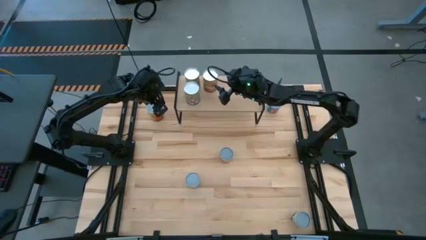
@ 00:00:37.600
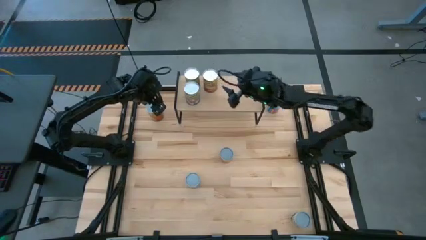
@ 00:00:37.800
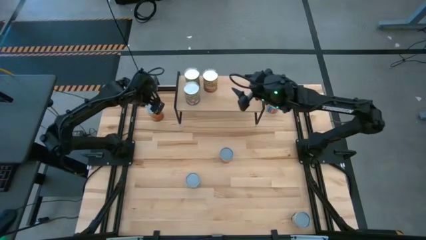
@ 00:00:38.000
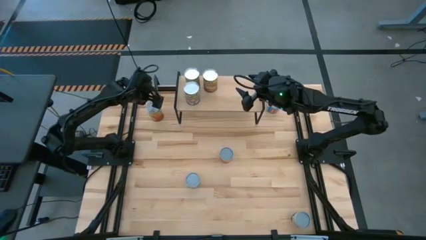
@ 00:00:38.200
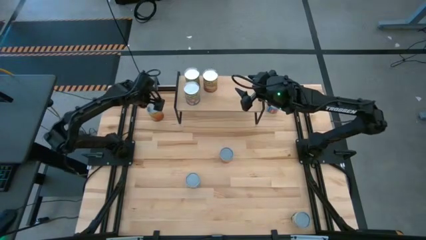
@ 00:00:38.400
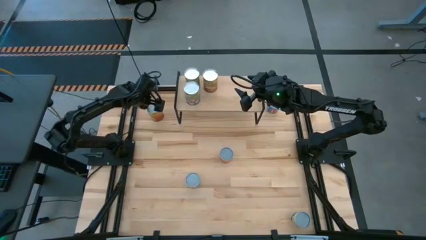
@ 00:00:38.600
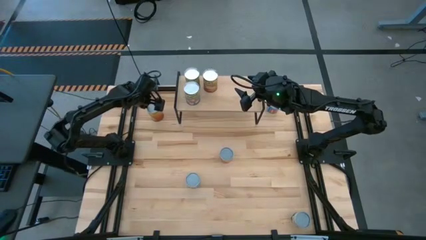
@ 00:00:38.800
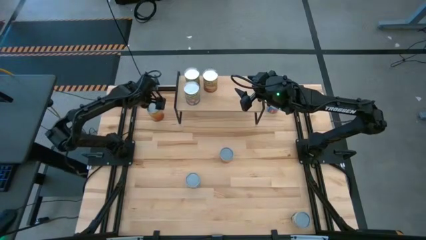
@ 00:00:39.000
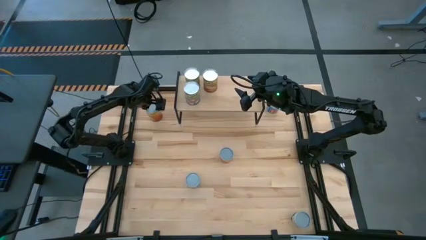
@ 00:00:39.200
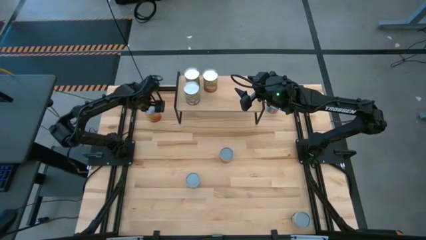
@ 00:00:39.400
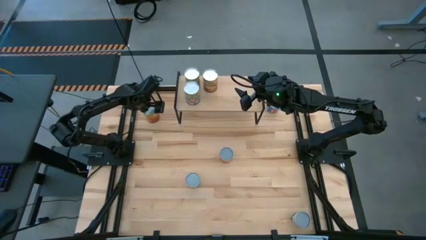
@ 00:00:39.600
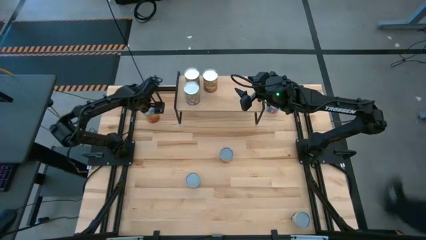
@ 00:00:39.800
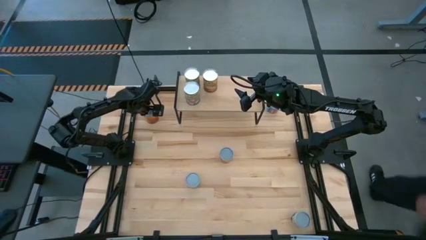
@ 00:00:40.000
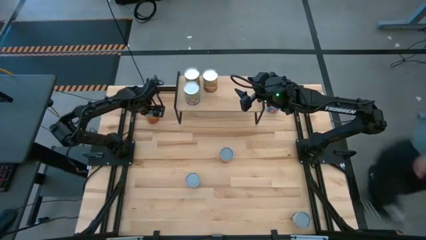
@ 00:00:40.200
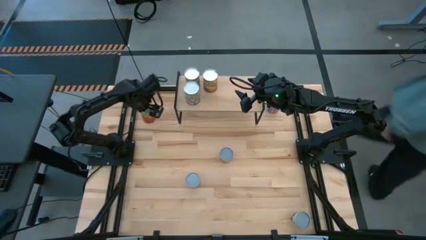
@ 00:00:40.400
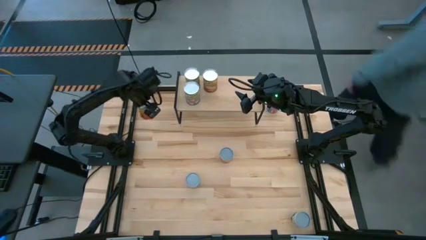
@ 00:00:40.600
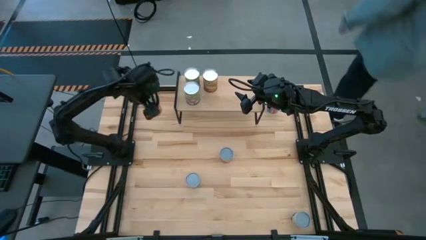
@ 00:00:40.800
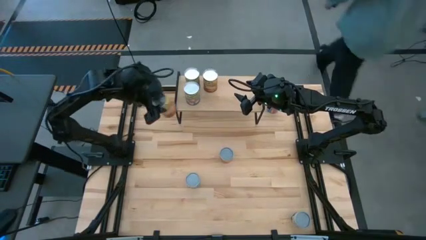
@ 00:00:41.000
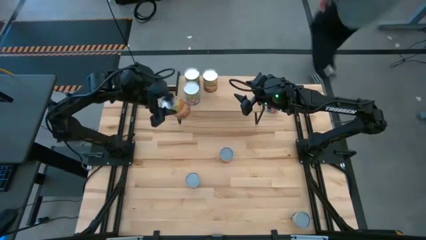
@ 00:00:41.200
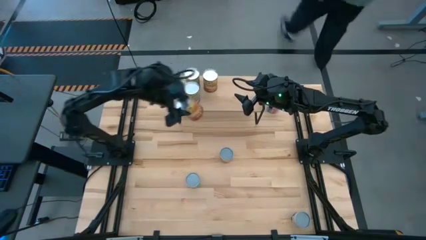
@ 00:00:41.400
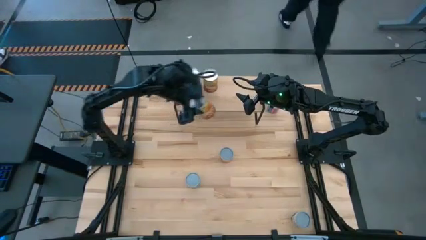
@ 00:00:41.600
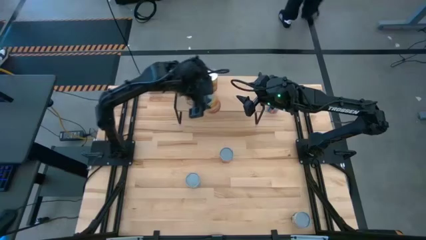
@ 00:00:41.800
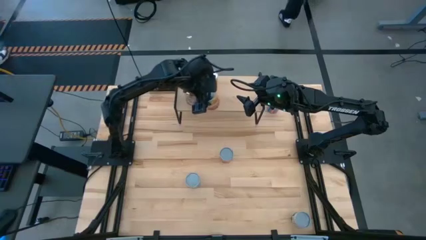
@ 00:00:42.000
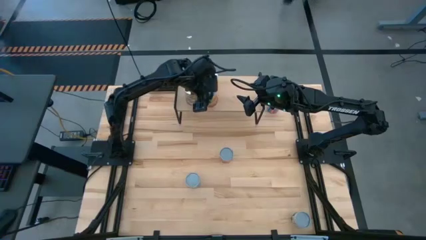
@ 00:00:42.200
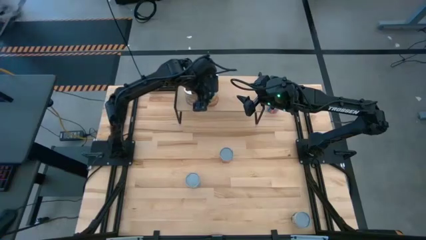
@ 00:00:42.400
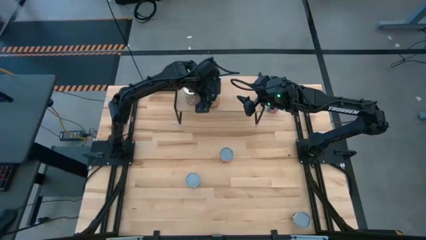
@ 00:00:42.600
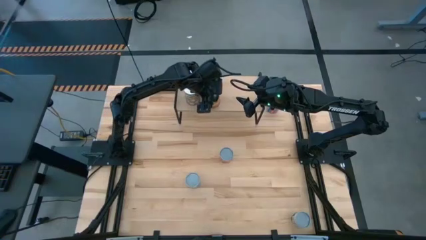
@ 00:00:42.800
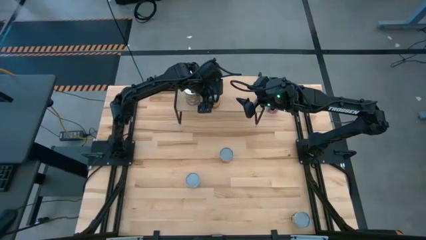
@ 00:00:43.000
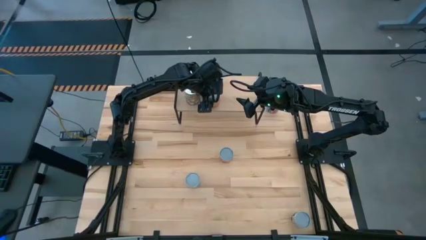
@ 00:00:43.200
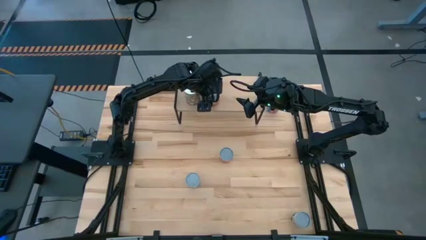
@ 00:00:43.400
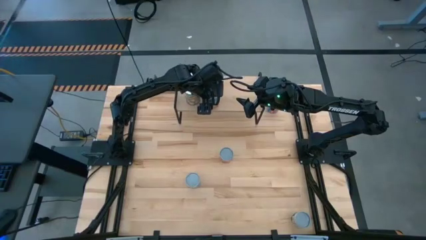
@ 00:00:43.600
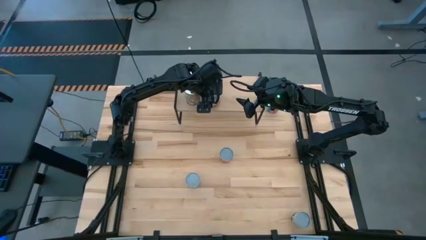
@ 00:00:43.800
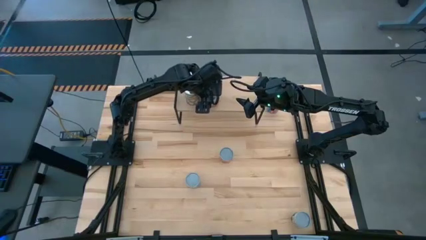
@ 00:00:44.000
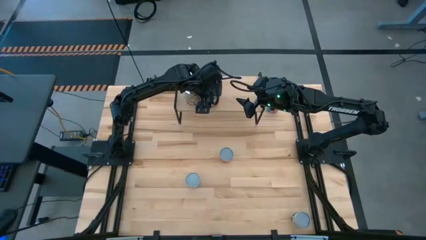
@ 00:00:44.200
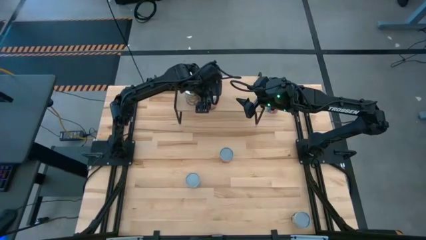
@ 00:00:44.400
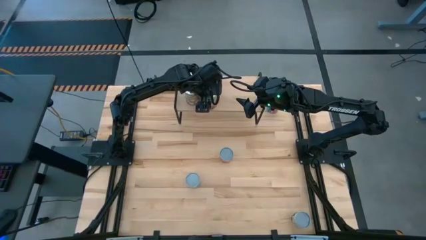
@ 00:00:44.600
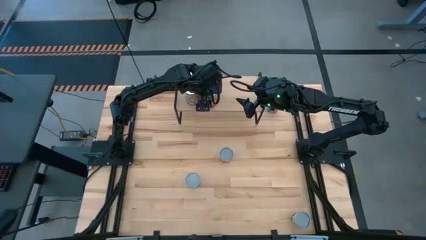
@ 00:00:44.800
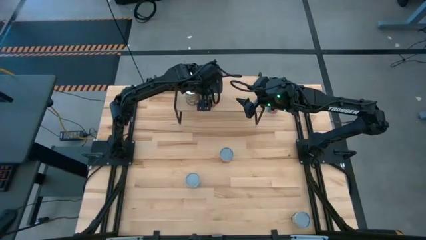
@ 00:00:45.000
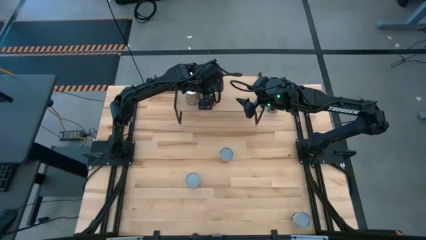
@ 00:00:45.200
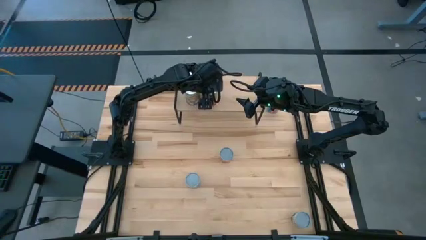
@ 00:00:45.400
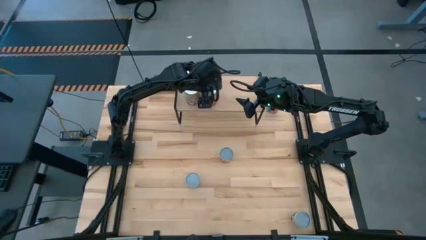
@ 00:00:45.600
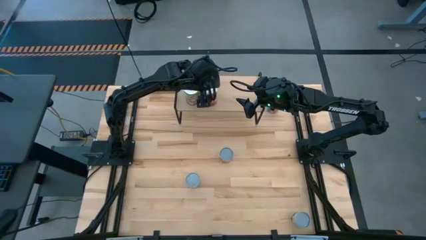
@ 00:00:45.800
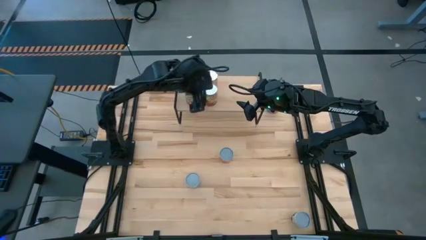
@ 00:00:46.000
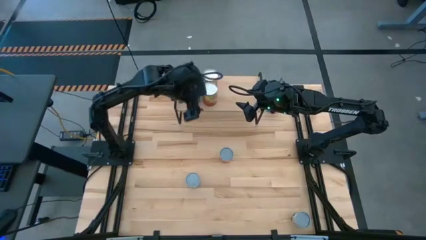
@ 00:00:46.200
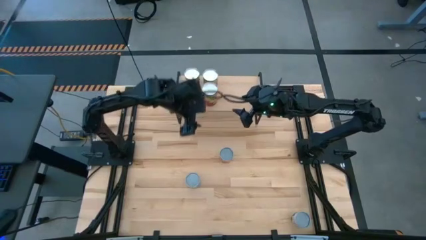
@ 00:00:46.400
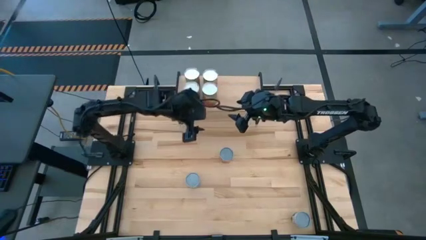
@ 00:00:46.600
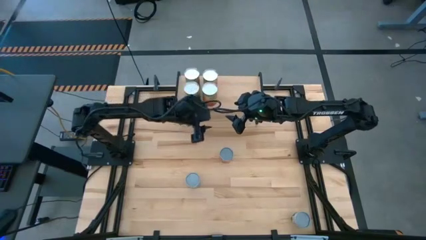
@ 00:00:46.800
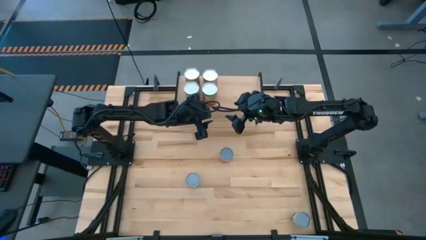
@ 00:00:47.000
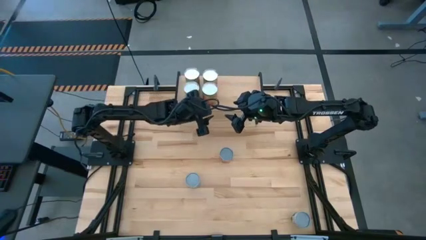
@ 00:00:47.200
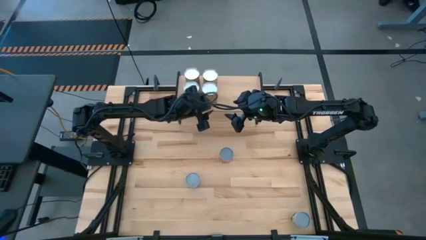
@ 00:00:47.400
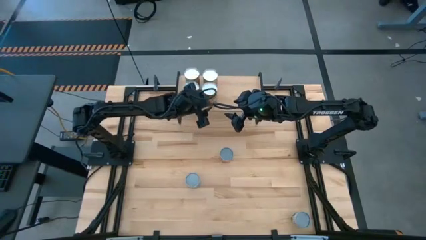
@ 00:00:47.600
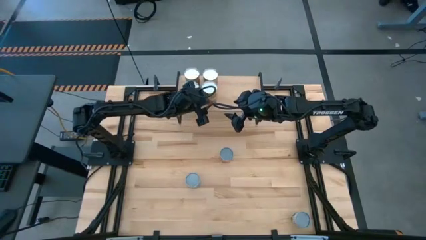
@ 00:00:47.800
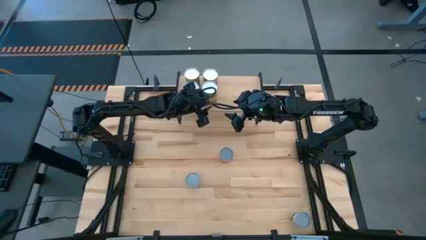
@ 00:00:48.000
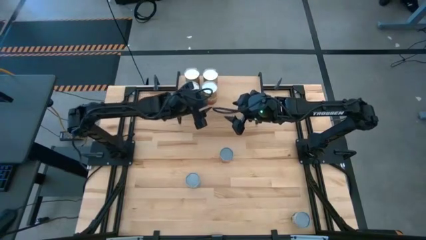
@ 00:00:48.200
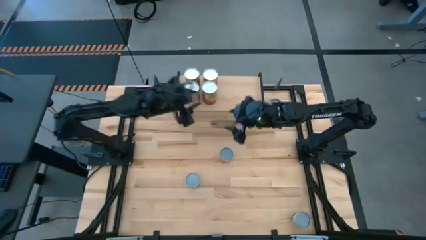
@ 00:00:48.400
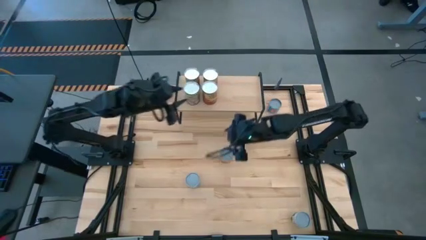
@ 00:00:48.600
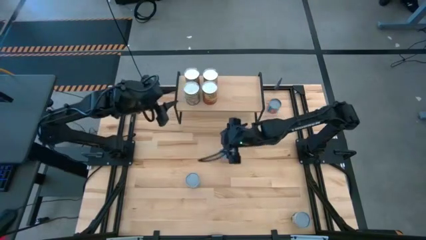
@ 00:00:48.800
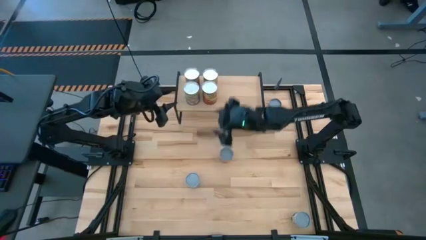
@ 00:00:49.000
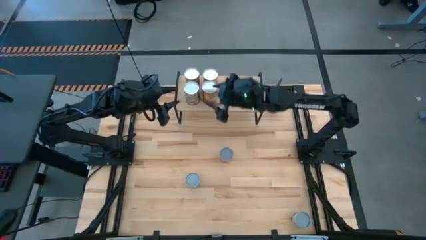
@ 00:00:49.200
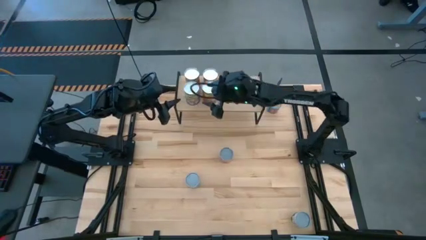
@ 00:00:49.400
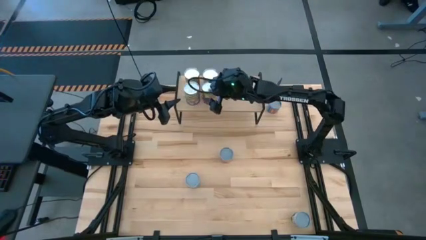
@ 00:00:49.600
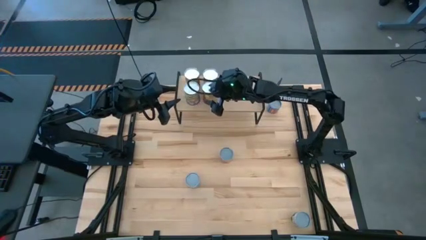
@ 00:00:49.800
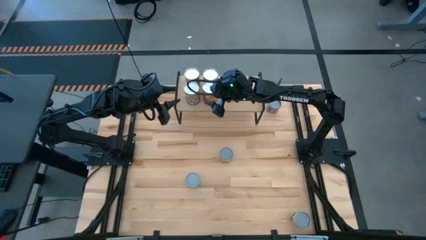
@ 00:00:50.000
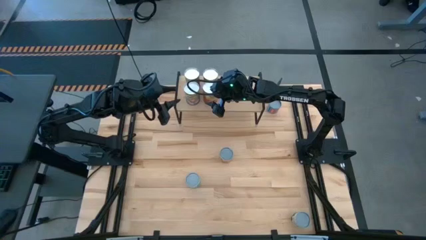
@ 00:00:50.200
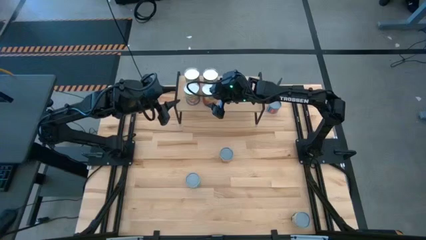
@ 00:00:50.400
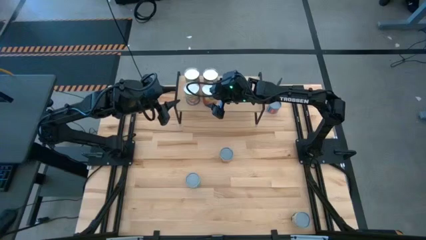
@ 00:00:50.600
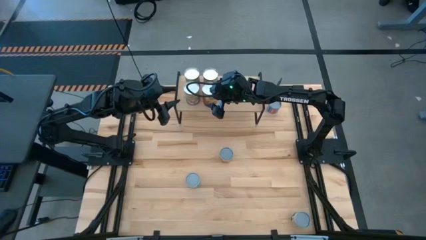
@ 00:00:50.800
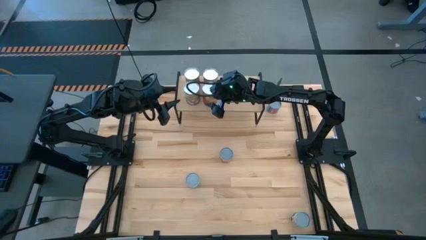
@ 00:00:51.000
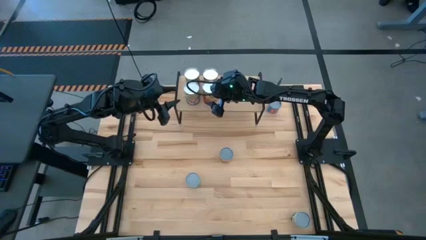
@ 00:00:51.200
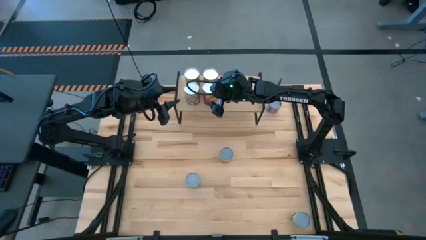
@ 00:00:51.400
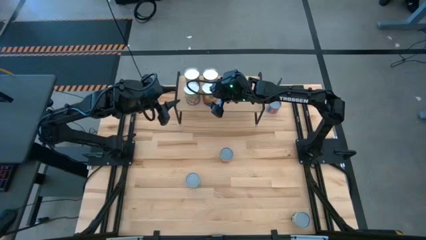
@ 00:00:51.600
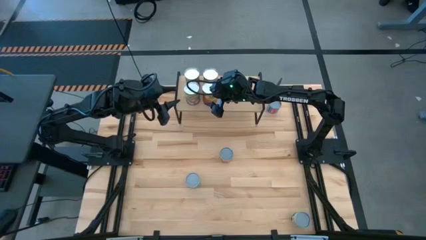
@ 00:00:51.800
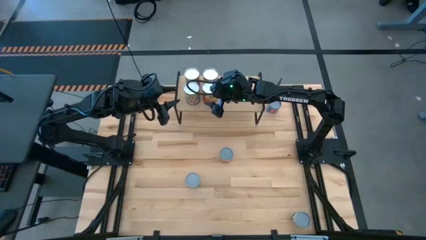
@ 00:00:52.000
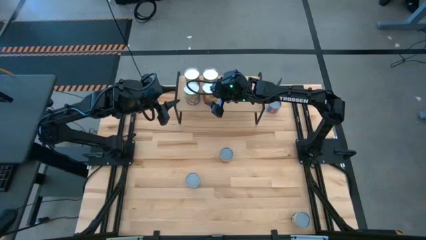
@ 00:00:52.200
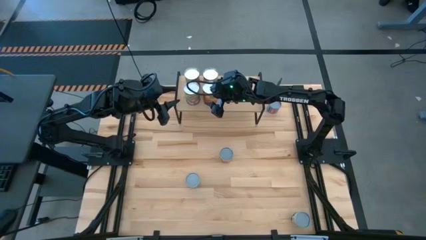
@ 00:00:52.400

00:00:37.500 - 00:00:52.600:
Task: Pick and place cans onto a shelf
Put the top left canned corn on the shelf aligned with the other canned corn
